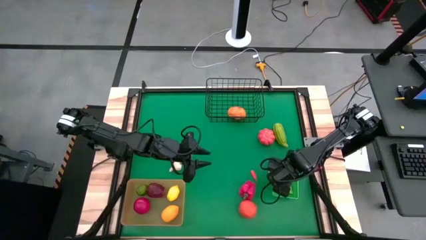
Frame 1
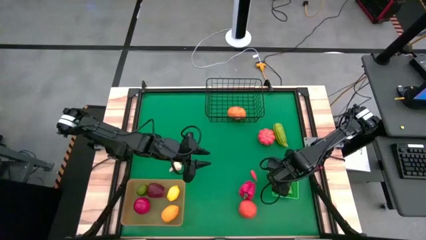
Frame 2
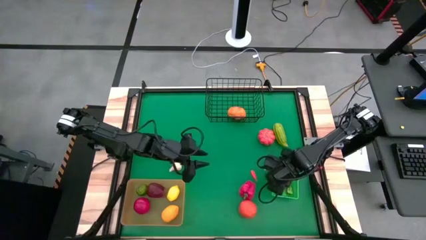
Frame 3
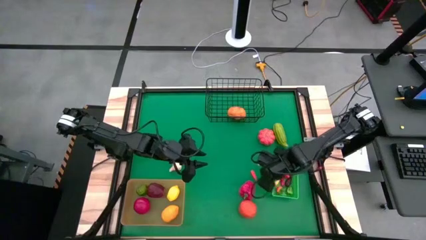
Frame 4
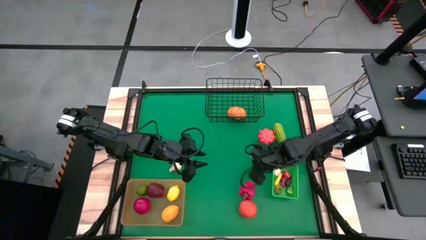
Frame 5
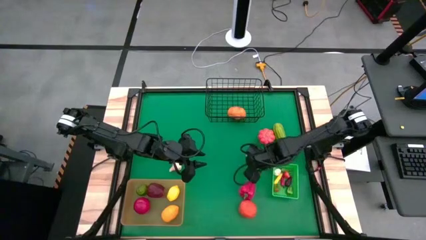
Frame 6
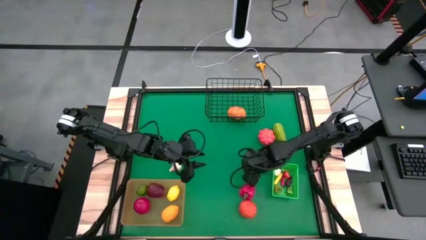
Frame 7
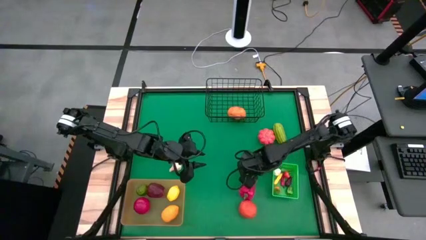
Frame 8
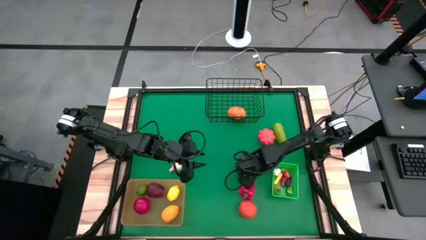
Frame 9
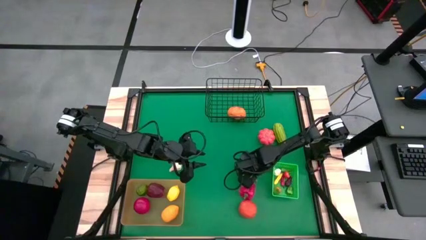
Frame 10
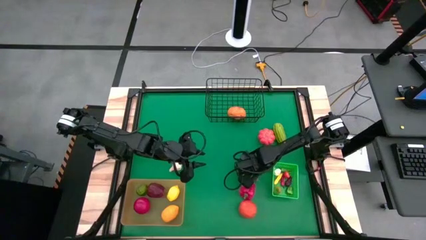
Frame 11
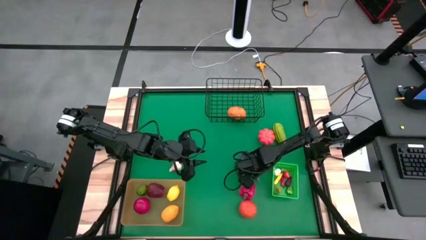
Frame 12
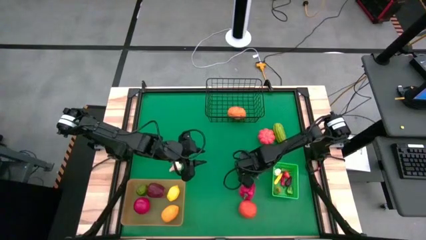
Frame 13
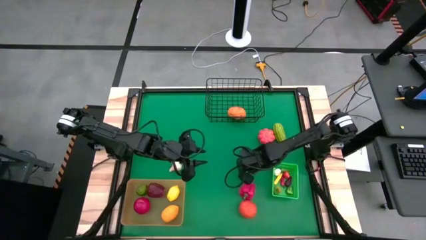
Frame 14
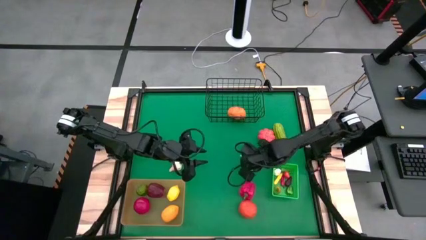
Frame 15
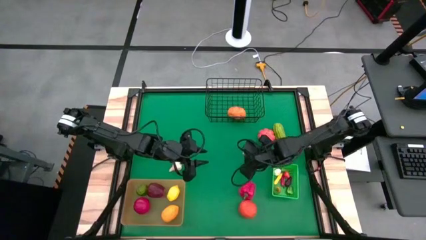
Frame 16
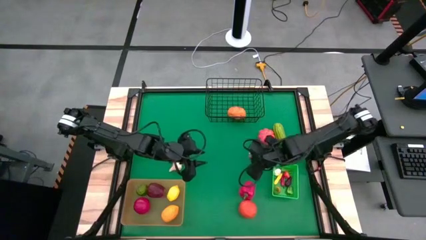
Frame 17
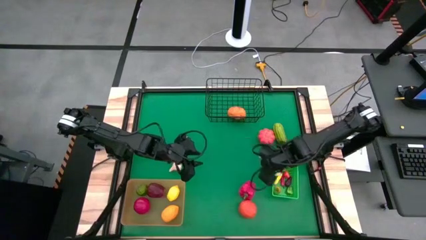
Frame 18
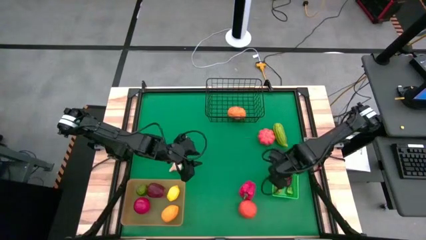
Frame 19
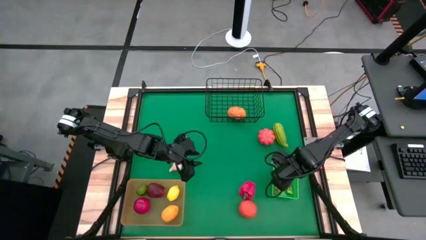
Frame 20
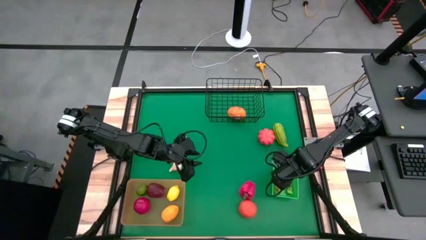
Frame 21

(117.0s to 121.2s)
Task: Sort produce into baskets
Put the orange chili pepper into the green bin

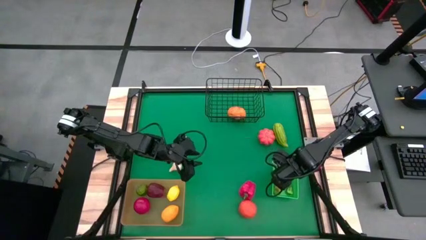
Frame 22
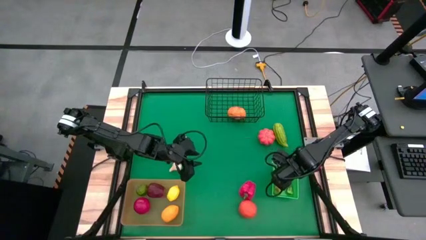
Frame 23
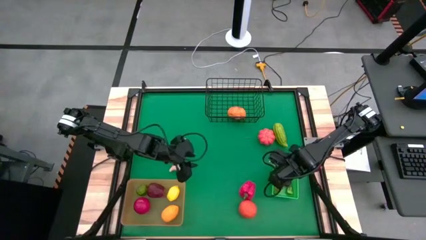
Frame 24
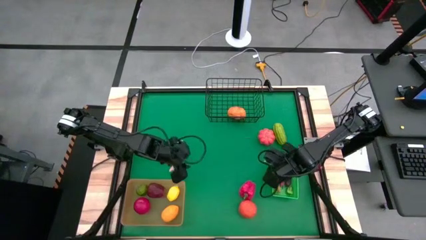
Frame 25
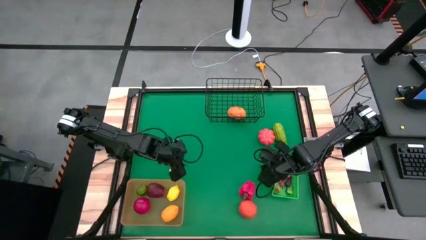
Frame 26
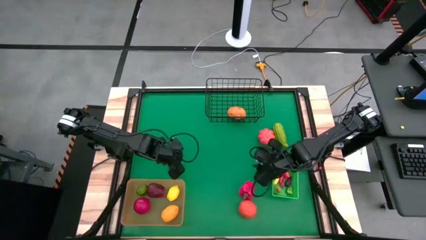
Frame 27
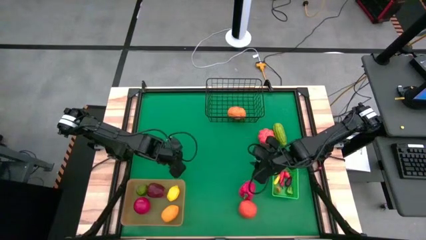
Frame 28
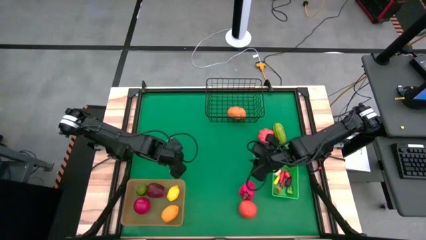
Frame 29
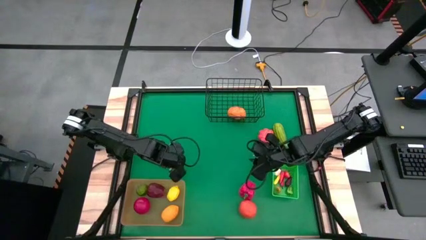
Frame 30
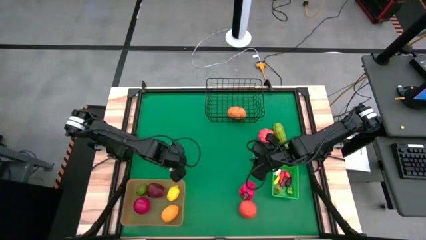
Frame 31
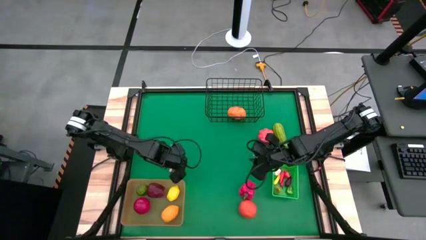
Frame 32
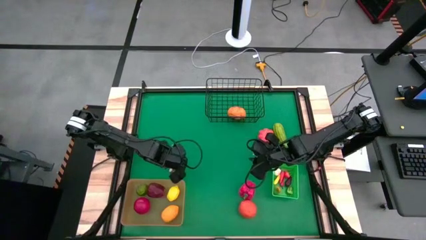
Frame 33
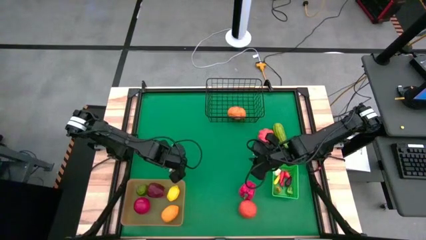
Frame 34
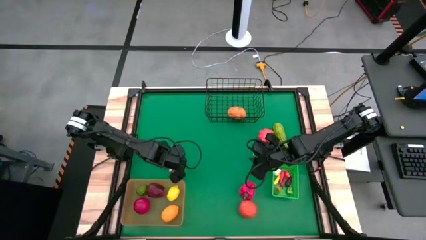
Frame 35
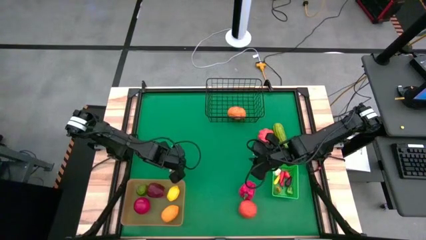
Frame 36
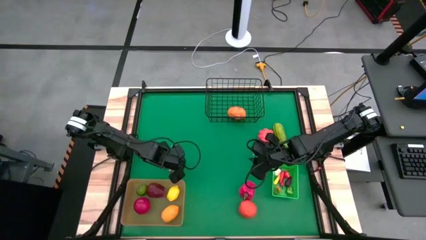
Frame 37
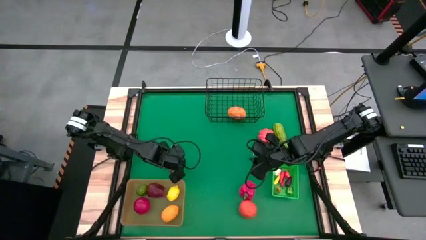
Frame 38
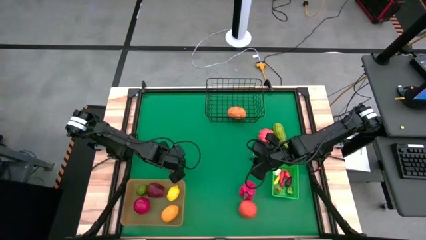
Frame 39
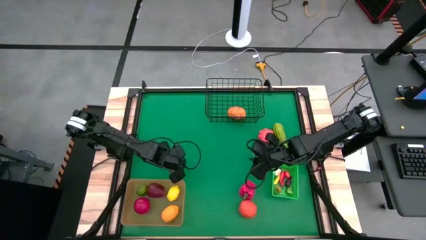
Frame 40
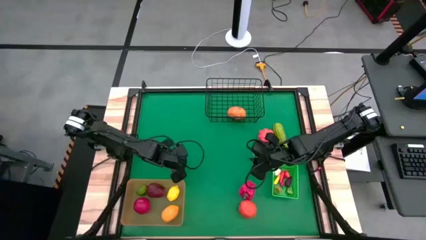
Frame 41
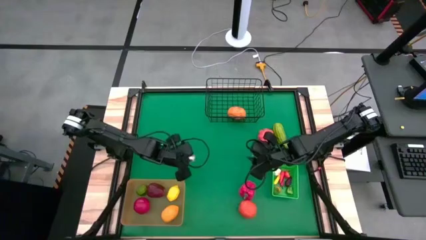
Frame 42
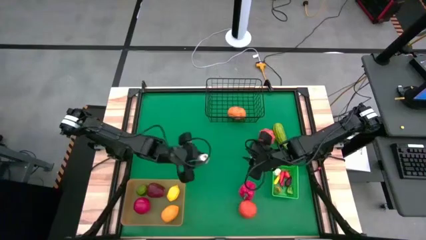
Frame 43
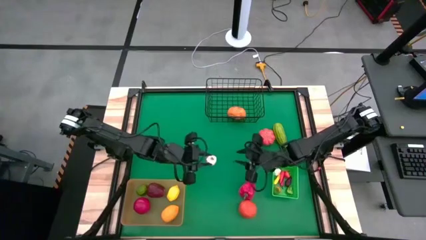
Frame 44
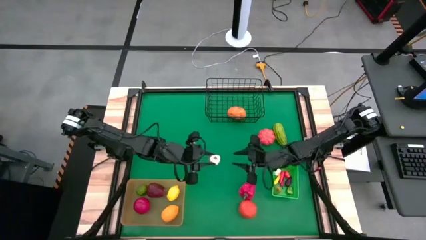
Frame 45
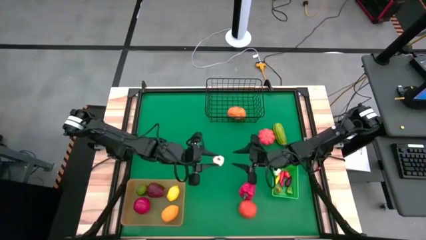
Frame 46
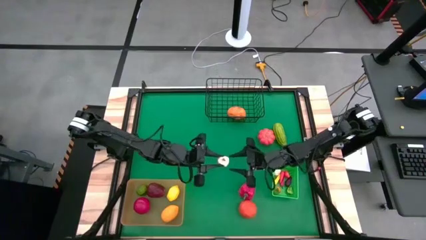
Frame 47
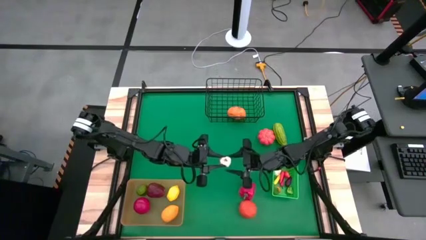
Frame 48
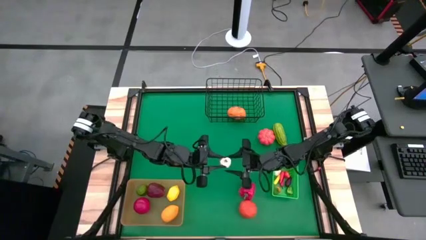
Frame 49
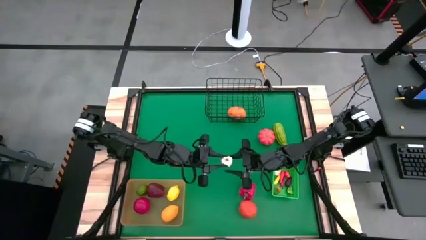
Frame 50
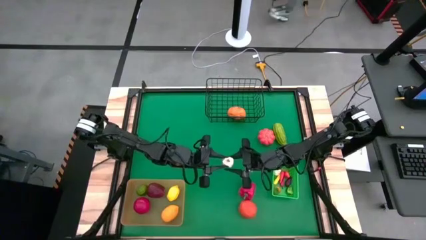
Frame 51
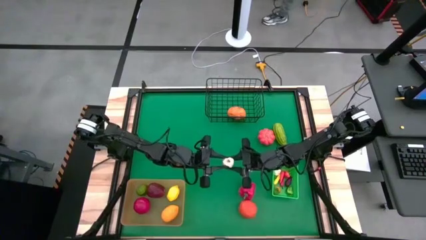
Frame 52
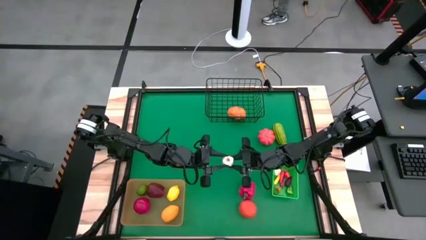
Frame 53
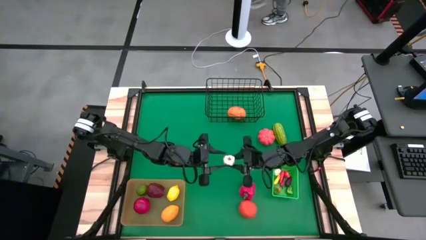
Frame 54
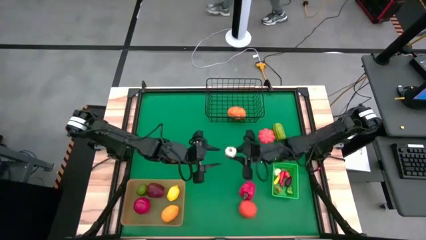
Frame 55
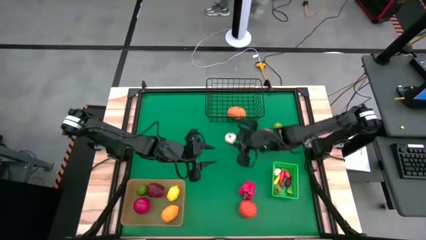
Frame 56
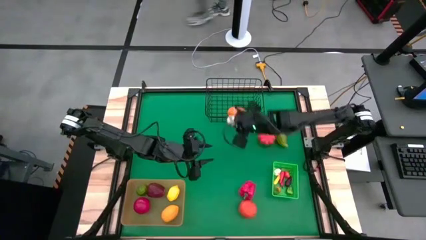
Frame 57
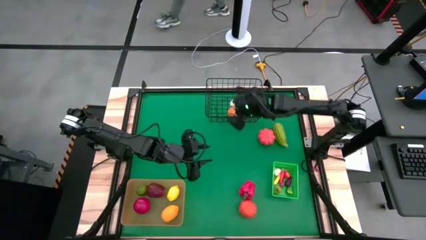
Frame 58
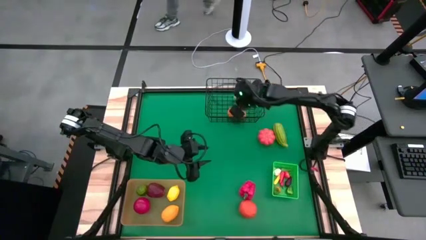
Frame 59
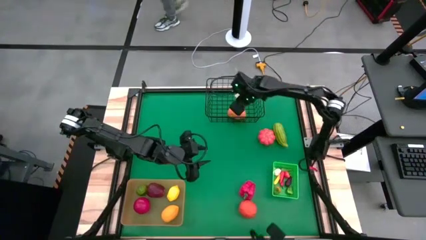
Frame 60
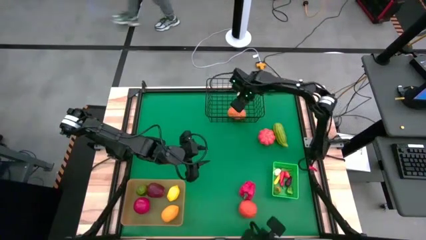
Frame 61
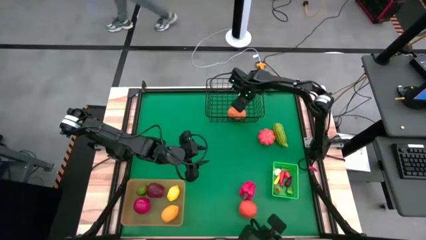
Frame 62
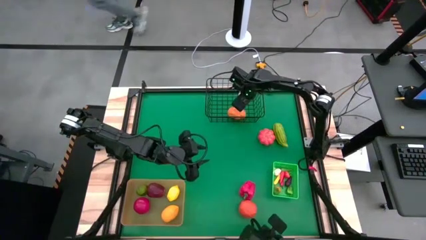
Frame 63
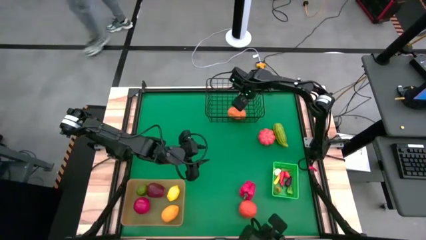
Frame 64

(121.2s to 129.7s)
Put the garlic into the black basket

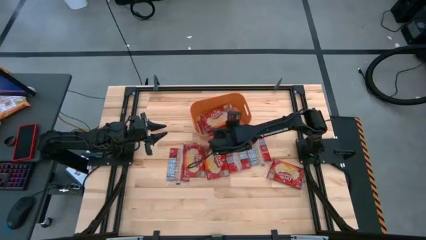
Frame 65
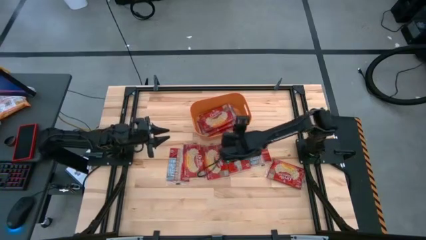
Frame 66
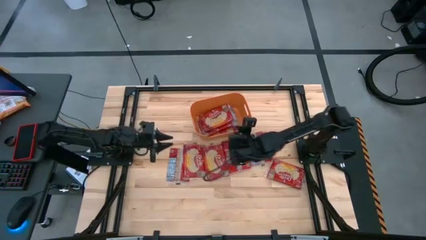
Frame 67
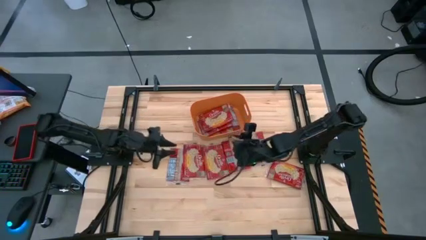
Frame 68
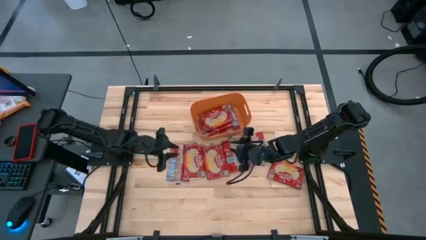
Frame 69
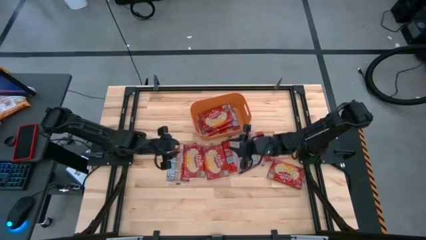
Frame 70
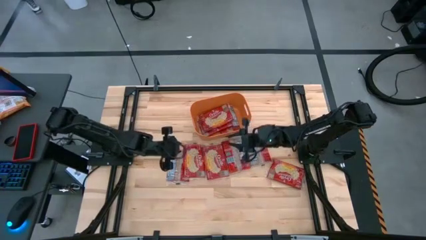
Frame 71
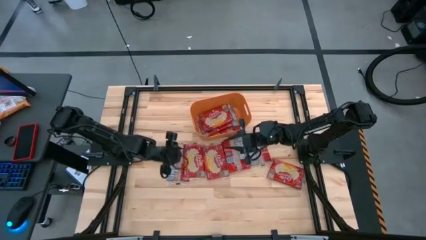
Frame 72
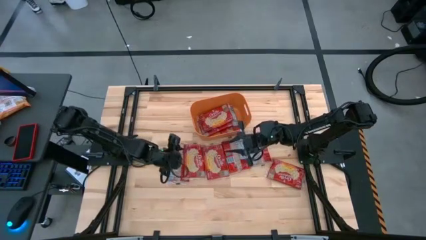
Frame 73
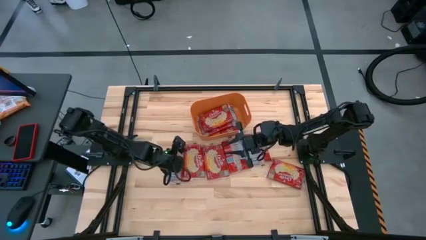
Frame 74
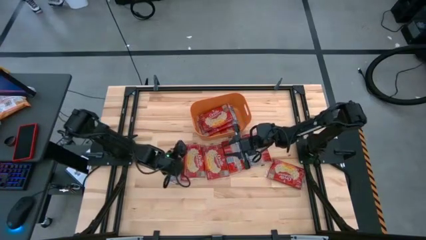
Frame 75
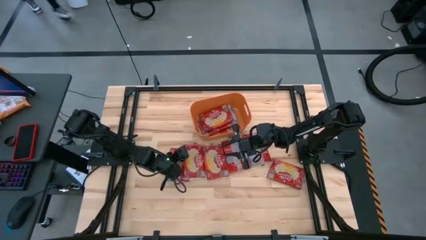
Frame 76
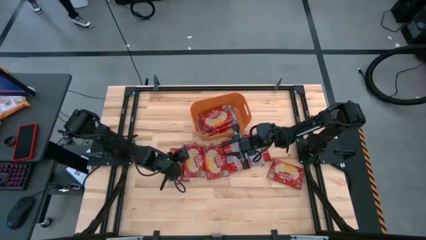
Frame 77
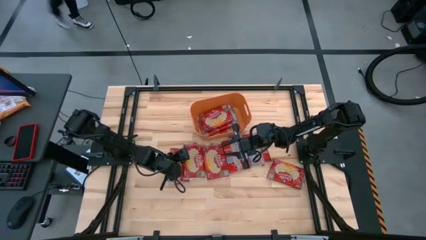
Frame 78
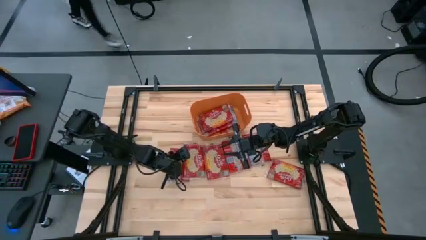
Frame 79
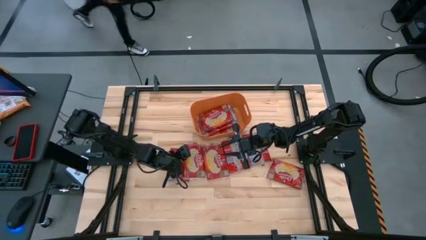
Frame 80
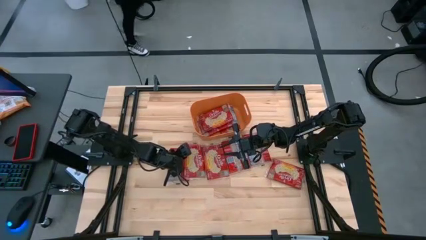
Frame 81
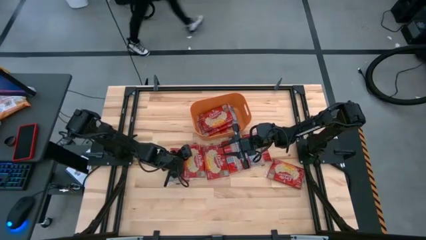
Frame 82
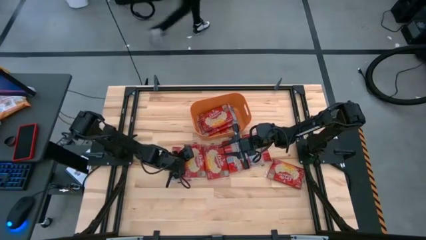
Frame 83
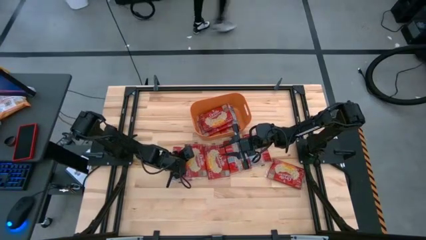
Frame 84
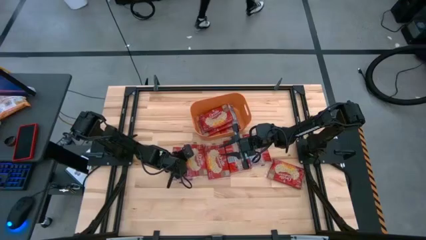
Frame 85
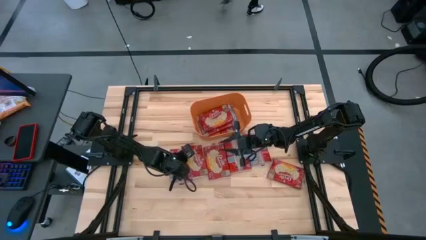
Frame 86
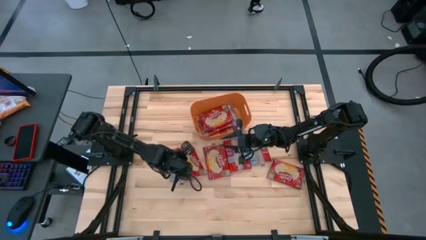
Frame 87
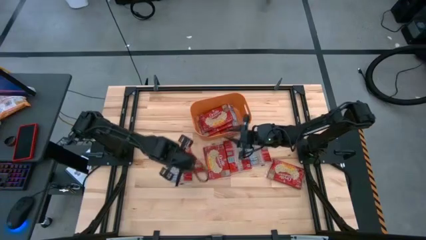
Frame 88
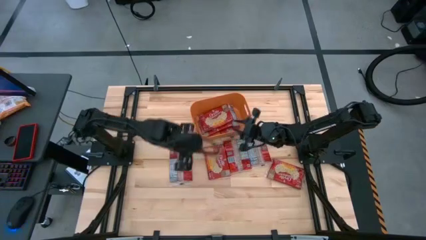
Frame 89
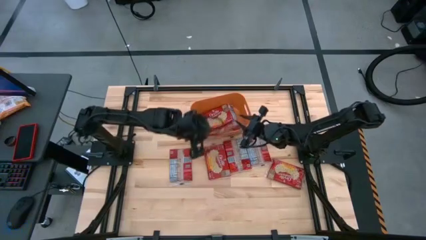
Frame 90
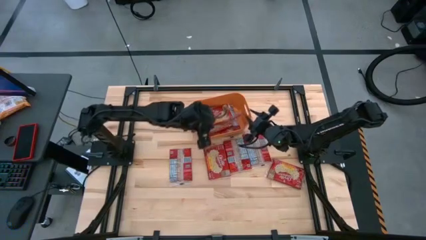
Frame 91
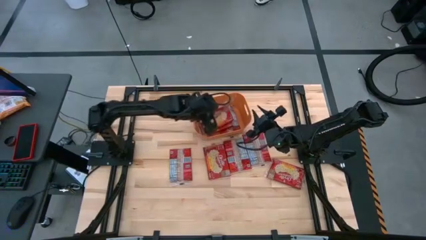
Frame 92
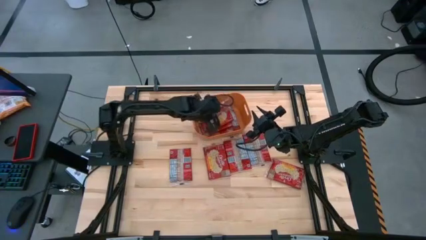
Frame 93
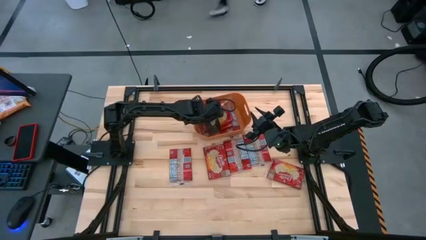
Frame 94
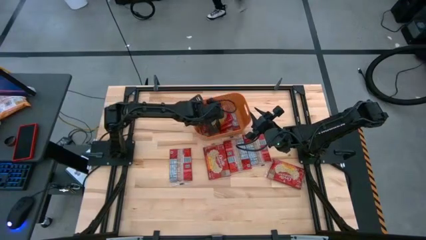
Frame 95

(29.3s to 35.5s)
Task: Sort popcorn bags into baskets
Put the red popcorn bag into the orange bin
